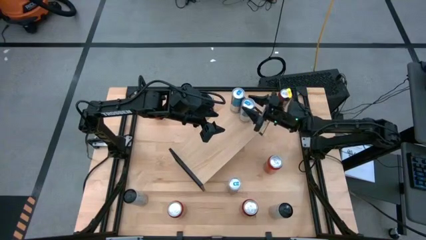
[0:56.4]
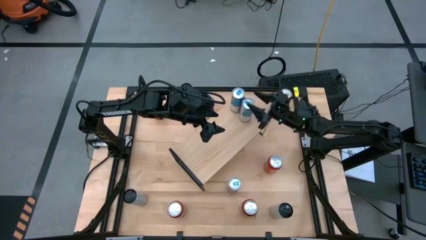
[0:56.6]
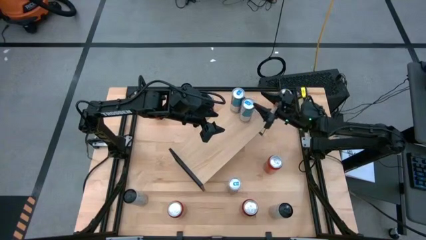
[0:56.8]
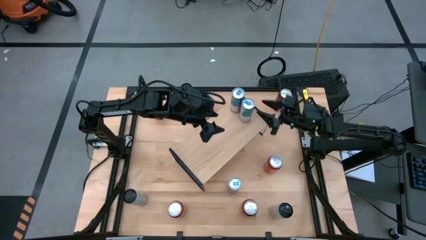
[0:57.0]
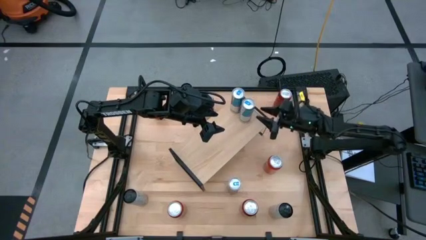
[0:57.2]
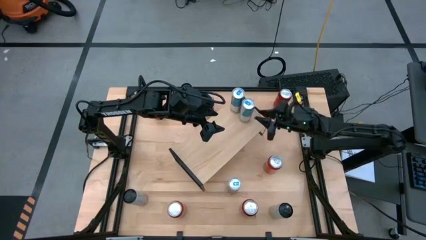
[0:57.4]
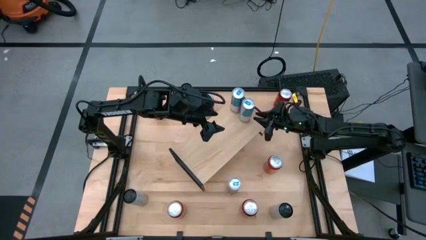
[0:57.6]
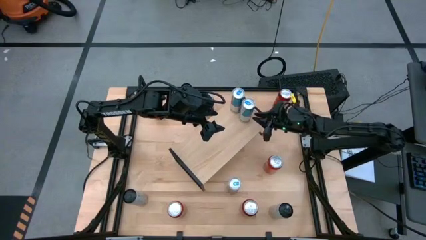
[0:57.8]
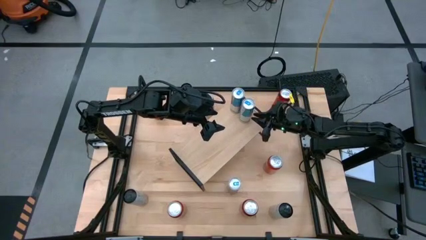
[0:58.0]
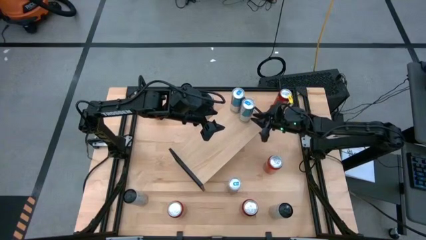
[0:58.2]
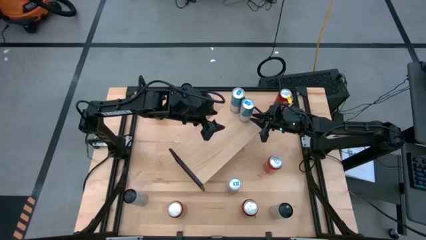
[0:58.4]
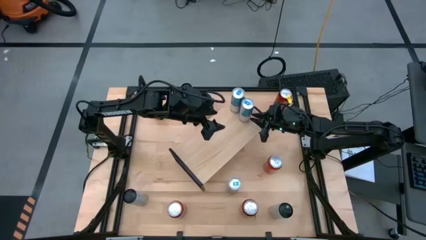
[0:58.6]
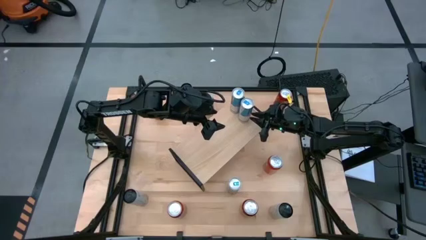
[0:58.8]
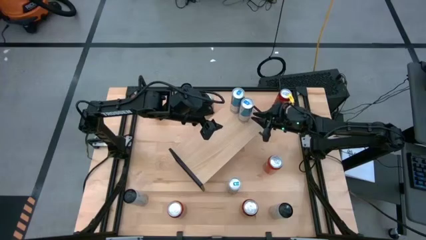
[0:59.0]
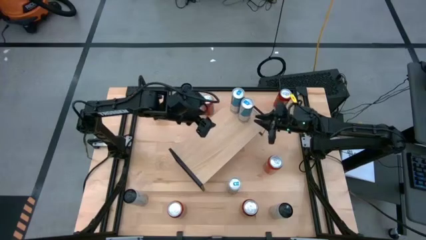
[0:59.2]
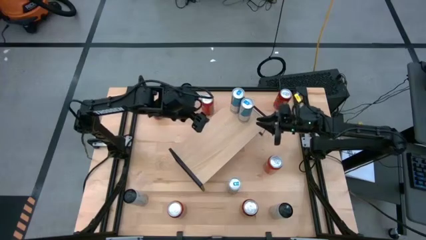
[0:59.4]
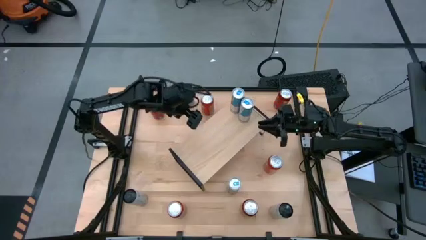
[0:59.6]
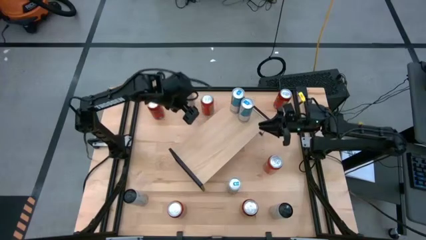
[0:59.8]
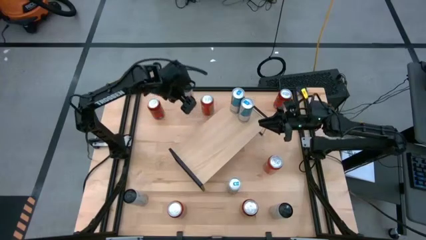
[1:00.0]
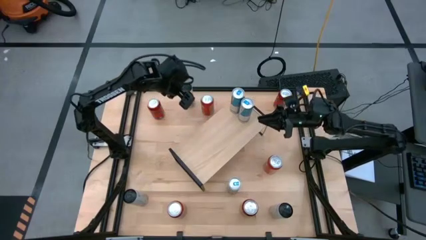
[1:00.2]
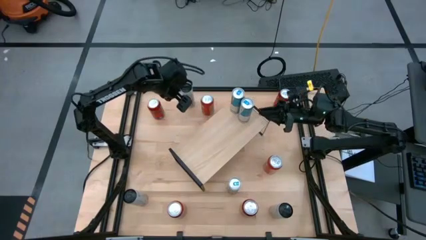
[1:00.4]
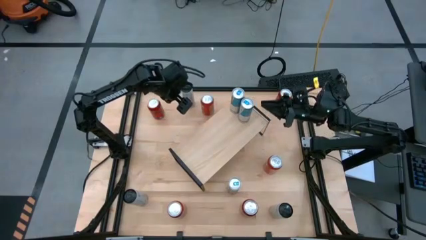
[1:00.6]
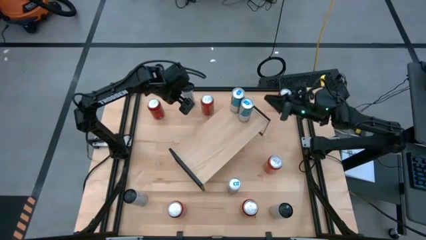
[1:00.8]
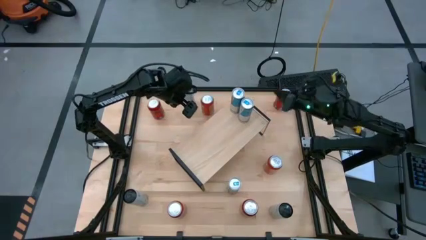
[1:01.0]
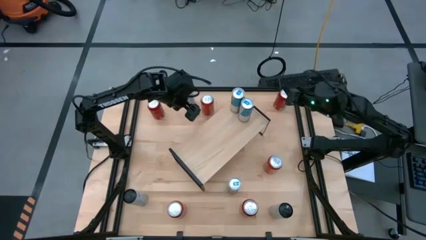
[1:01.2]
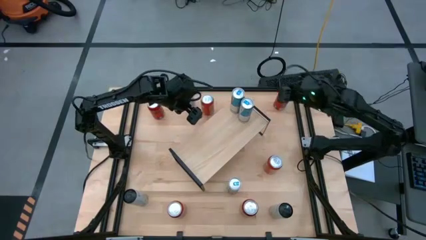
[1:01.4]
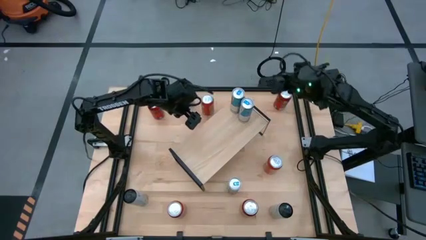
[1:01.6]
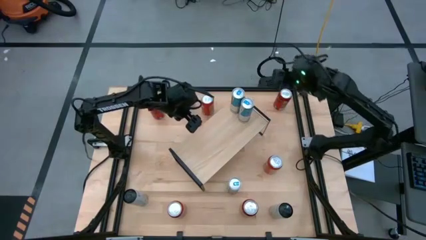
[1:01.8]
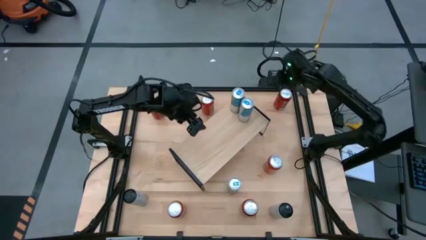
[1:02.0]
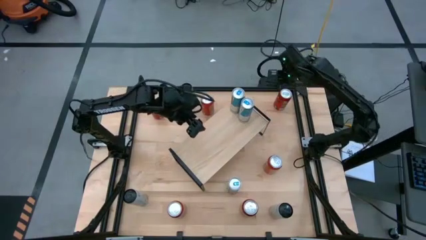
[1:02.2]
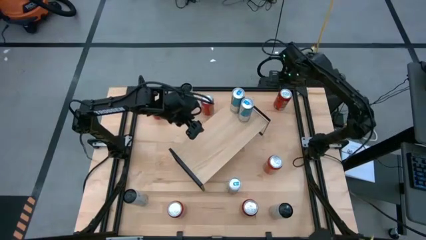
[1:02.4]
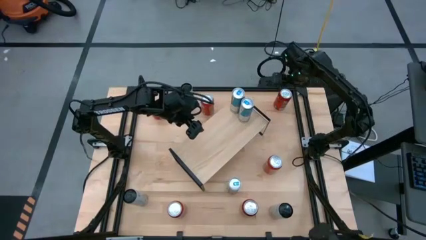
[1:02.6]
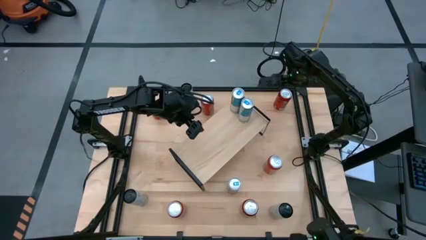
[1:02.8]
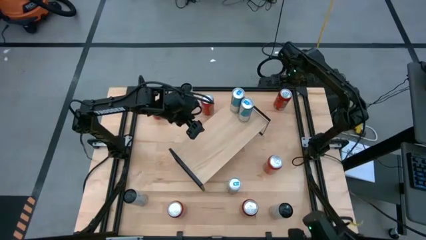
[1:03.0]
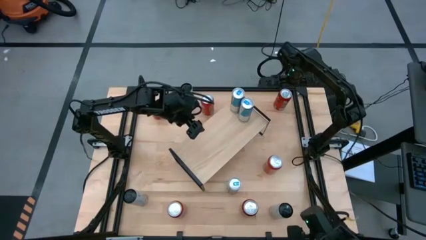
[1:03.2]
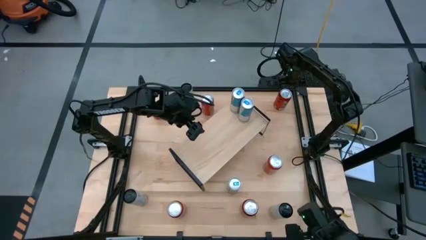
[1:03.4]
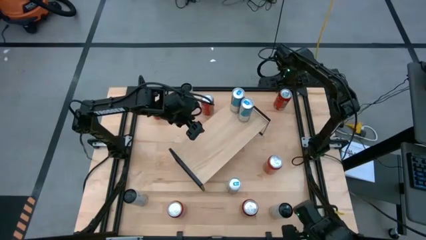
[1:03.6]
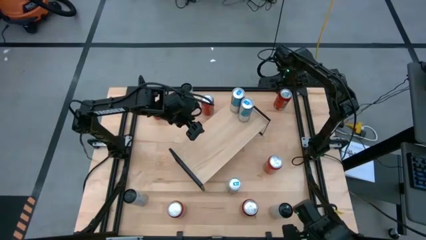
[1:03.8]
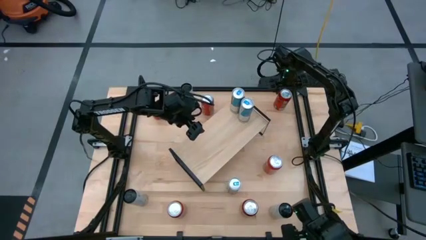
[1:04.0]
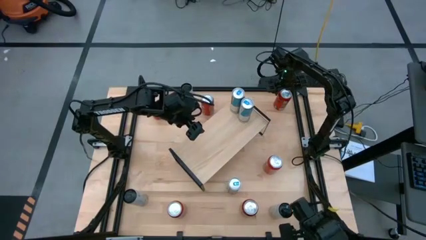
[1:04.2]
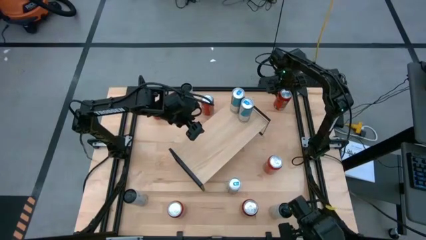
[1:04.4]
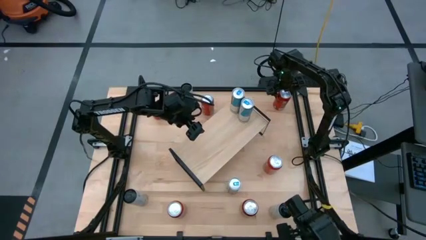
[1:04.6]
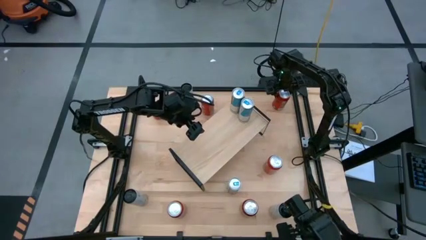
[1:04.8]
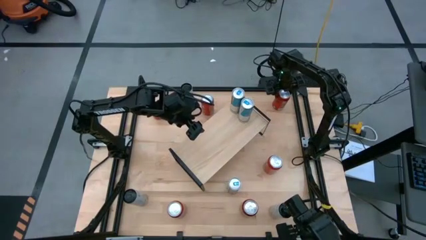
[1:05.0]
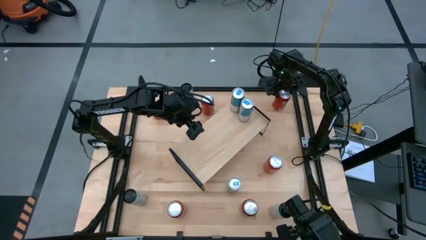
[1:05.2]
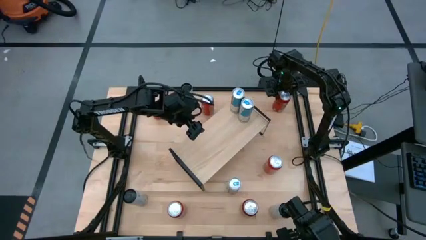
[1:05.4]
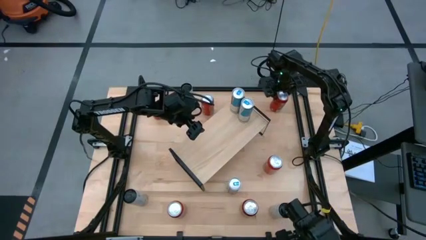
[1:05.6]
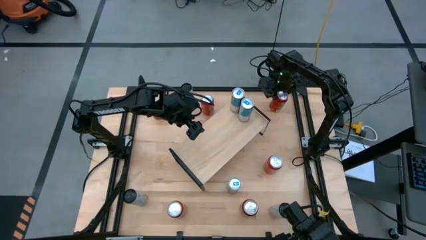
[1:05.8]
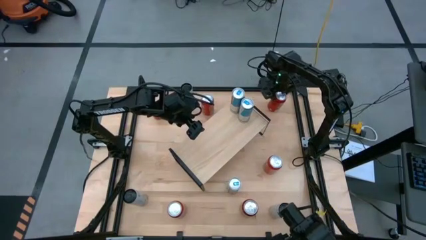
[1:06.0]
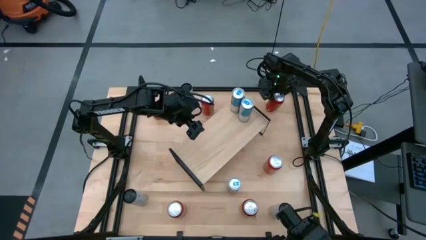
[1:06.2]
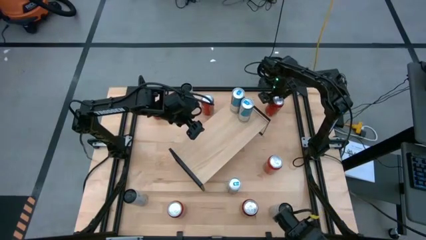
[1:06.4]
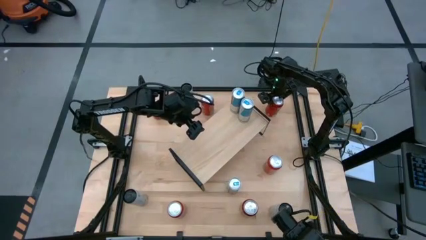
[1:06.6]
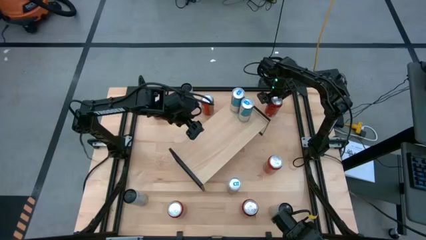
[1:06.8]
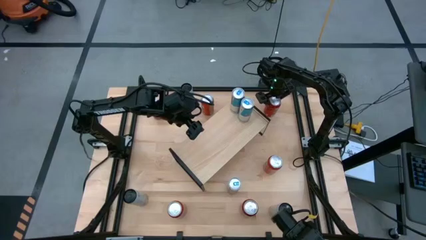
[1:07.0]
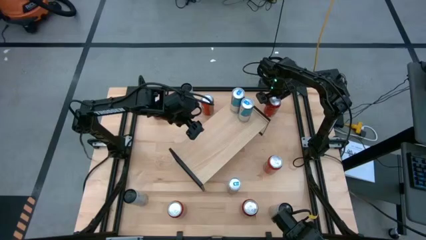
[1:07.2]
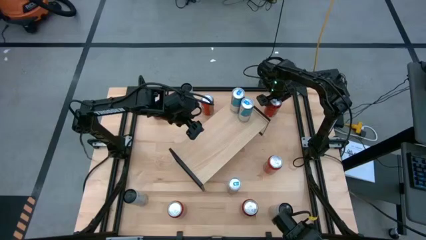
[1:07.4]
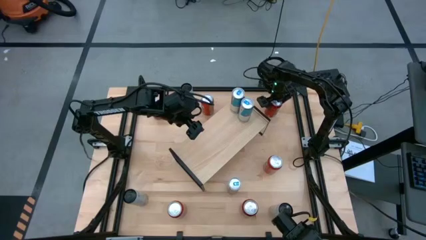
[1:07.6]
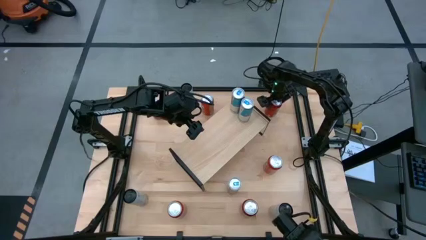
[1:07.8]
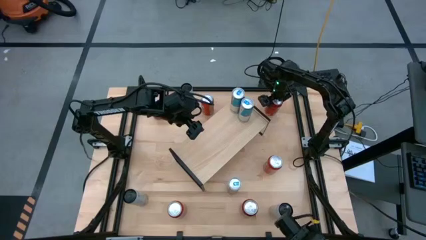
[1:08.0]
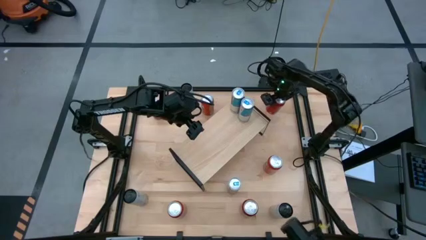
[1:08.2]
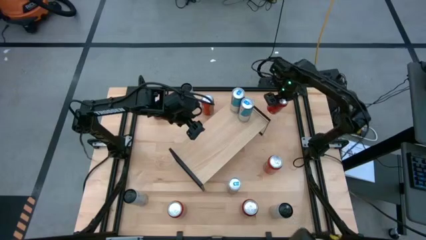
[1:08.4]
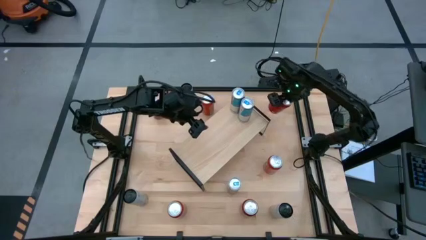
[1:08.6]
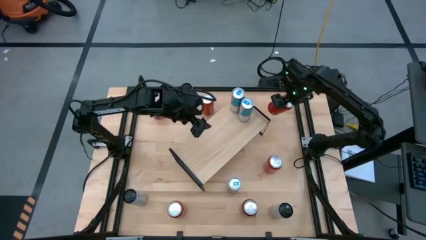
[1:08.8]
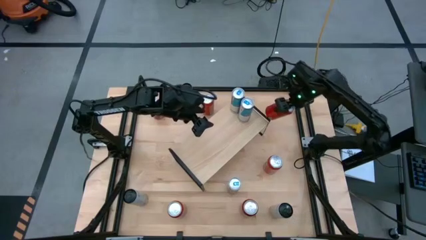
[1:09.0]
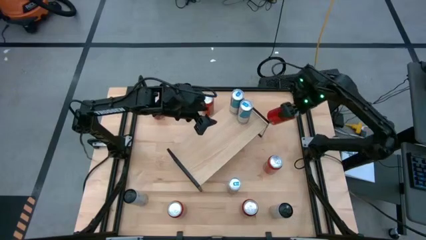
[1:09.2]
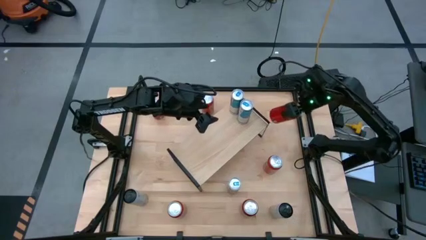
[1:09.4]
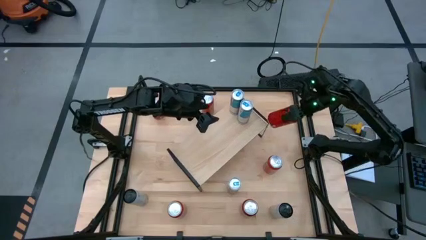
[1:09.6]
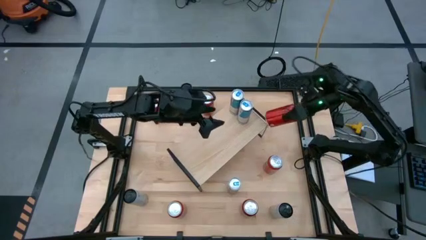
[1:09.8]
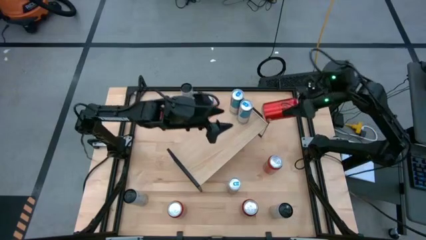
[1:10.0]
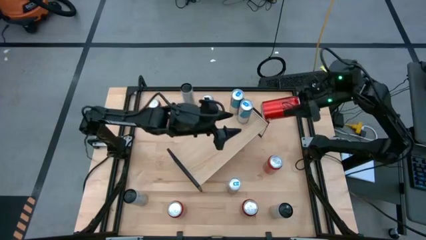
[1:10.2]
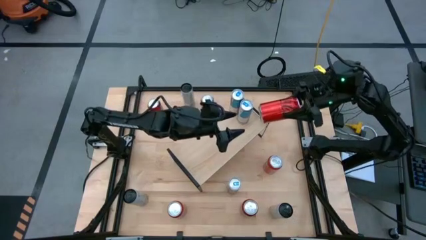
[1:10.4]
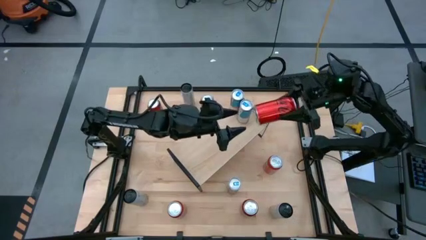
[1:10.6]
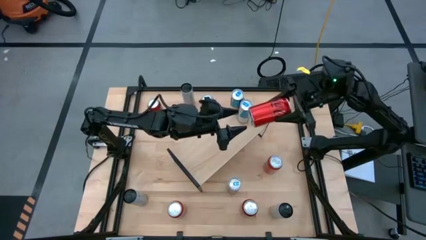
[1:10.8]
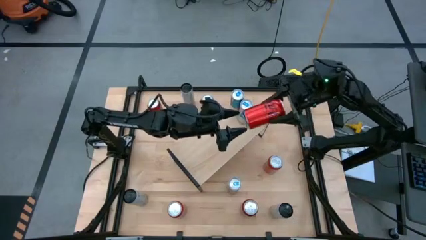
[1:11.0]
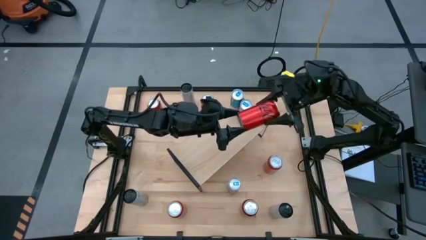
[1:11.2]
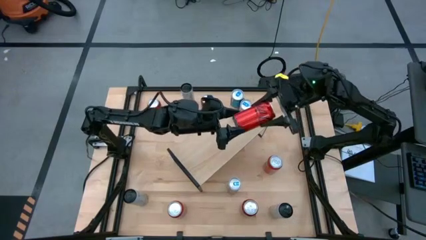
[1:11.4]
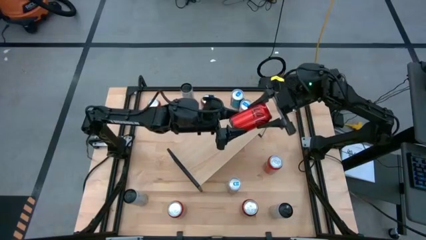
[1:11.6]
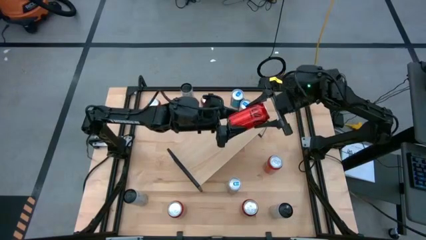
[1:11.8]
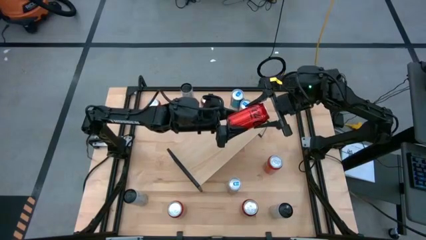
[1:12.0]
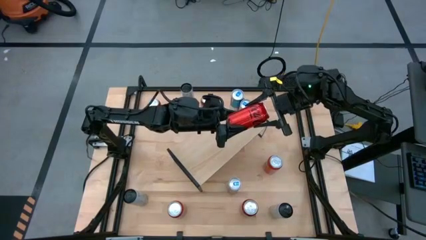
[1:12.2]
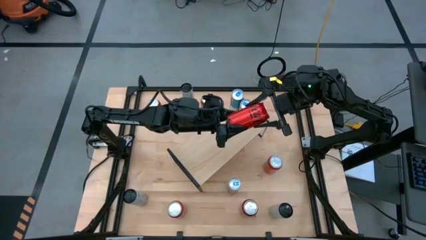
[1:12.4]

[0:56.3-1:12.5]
Task: Place canned beverage on shelf
Put the top right red soda can on the shelf
